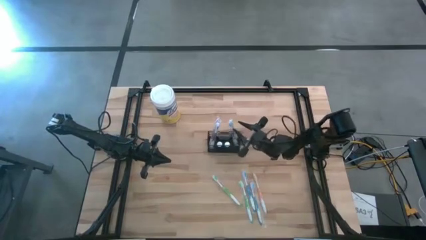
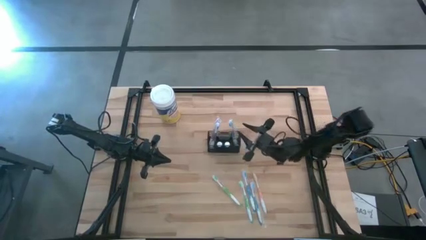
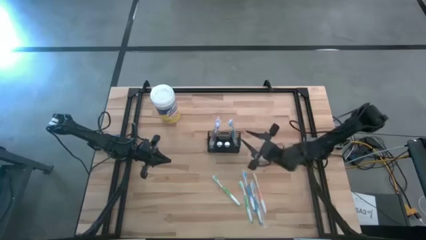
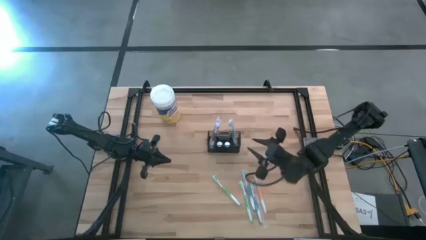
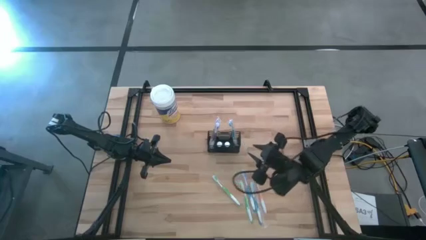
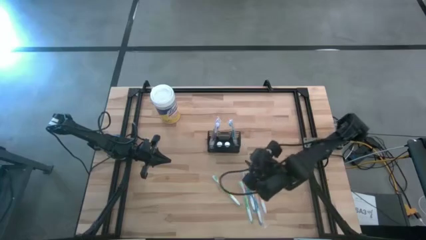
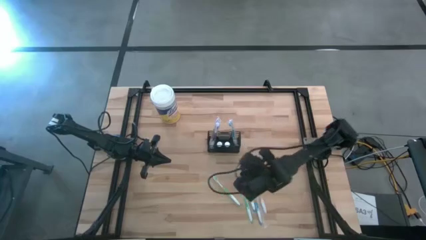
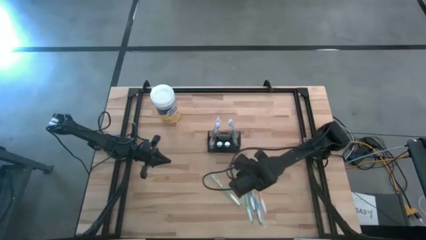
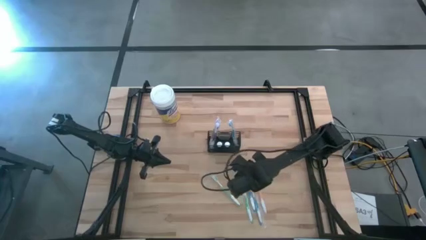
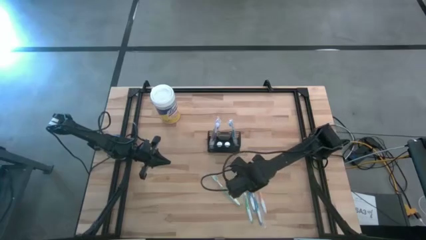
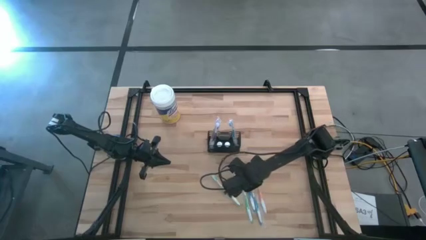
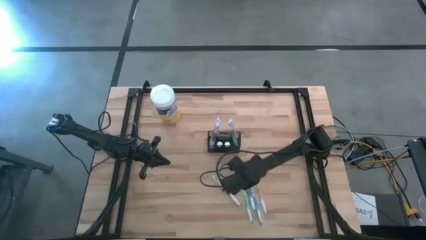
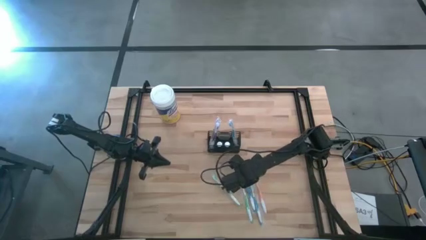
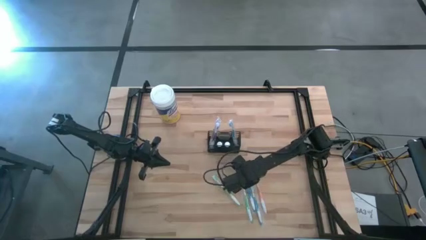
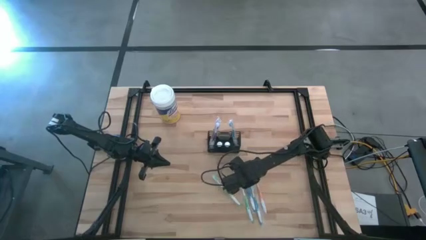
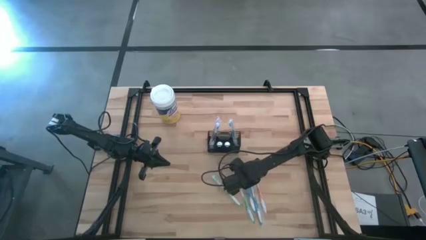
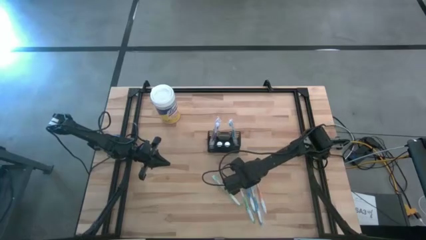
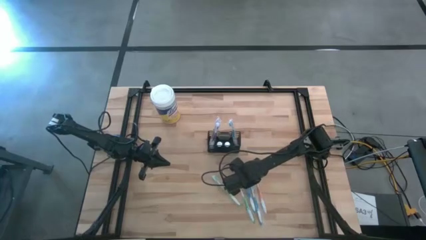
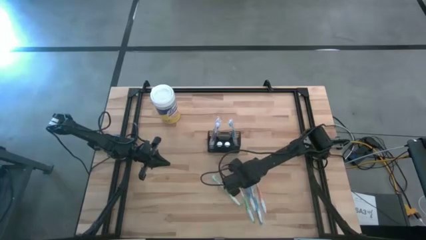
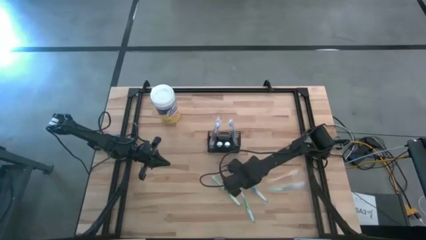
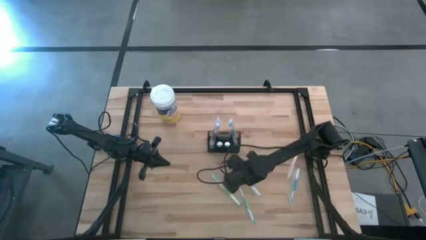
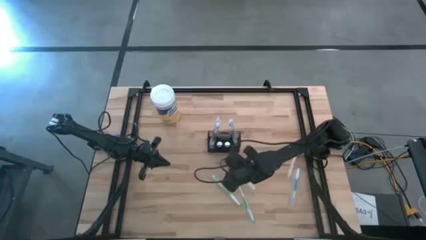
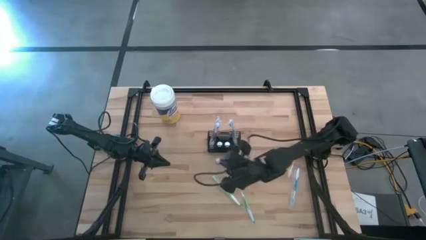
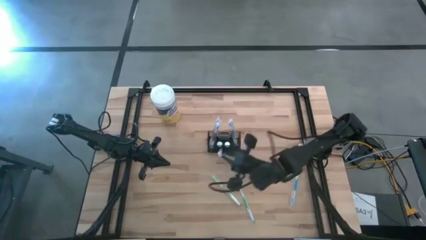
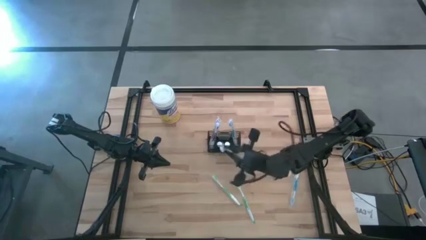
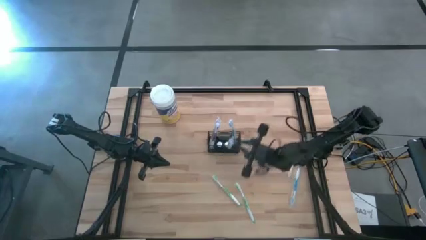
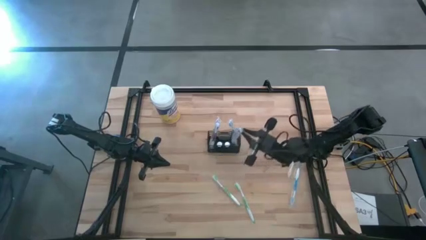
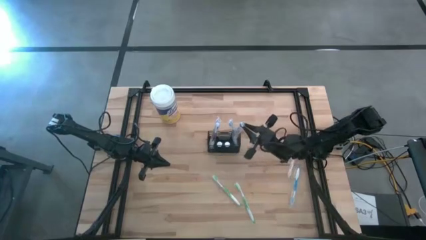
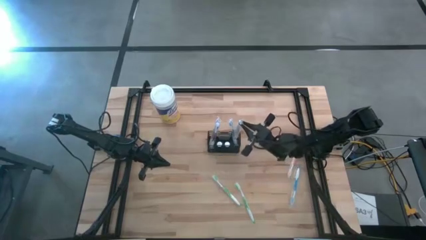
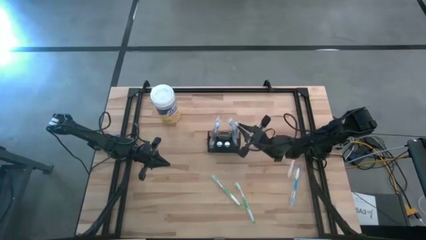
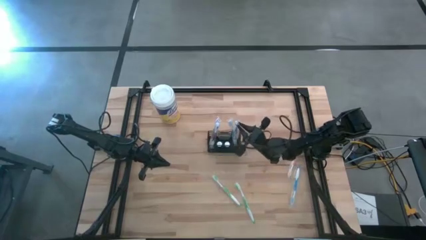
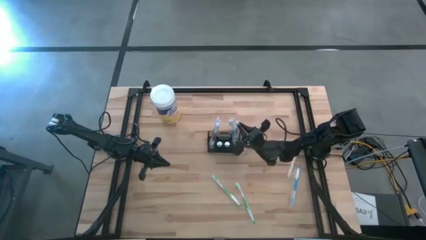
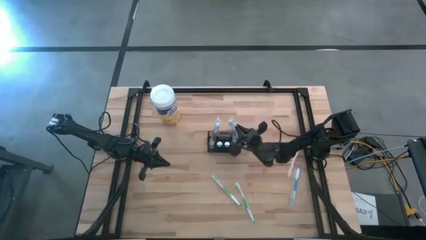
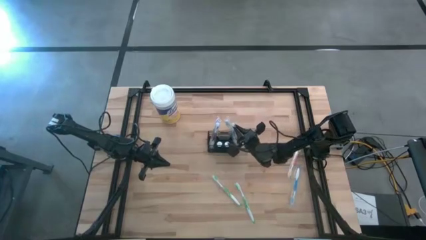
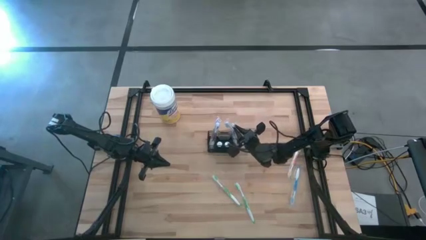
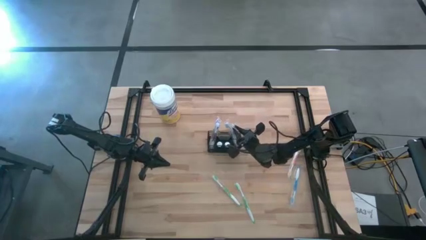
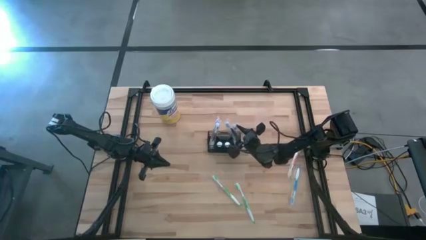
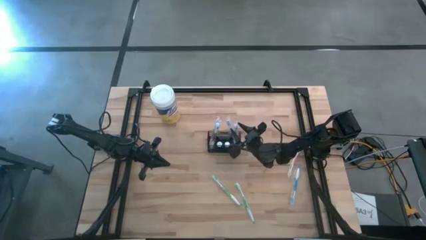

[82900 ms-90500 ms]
Task: Pick & Place toothbrushing station
Put the left blue toothbrush into the wire organizer

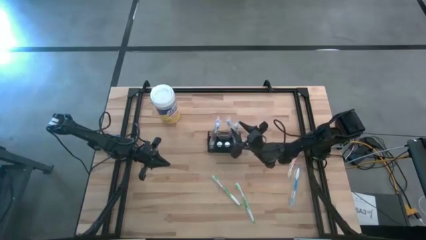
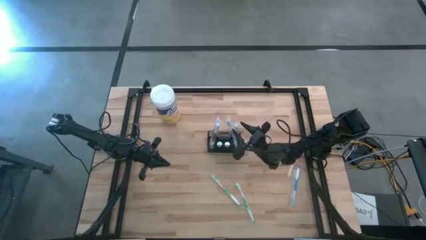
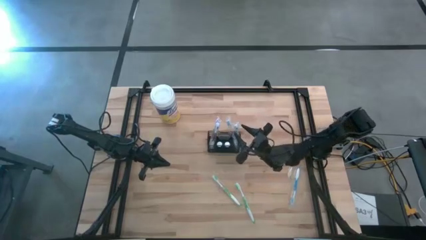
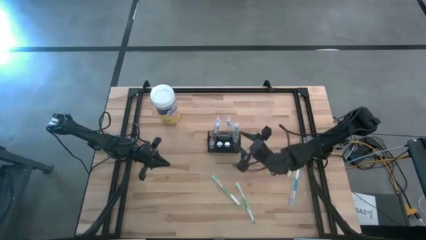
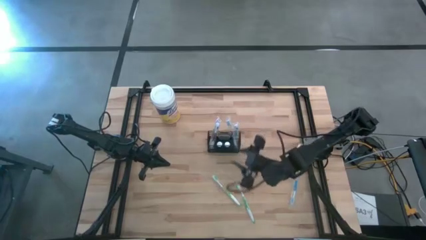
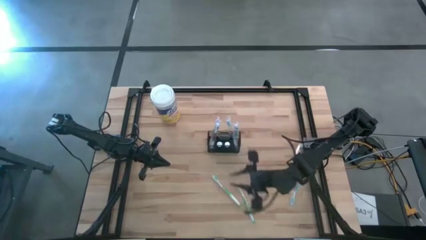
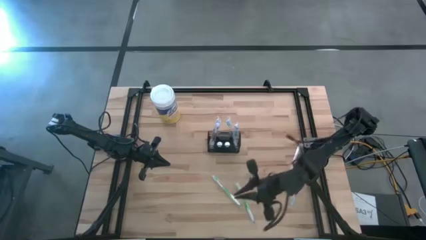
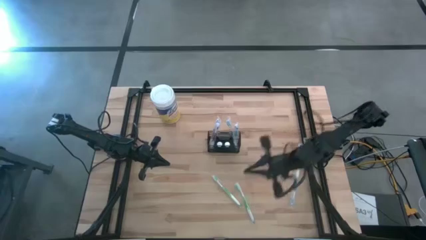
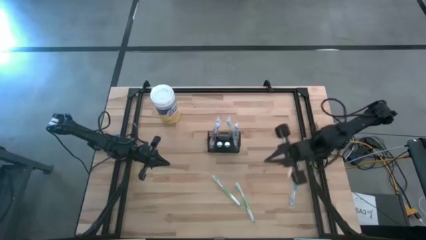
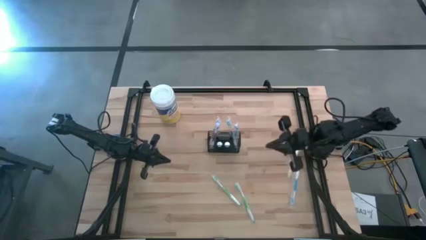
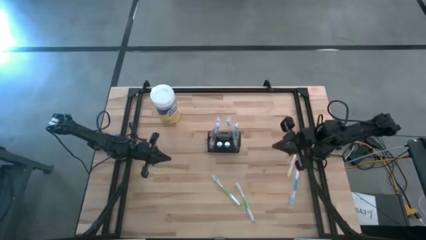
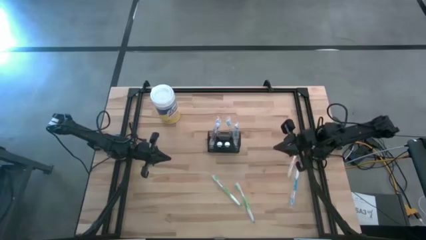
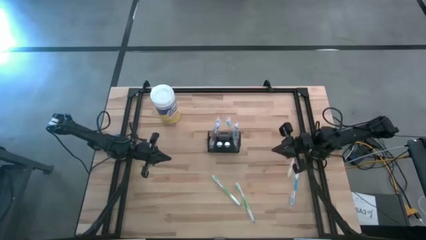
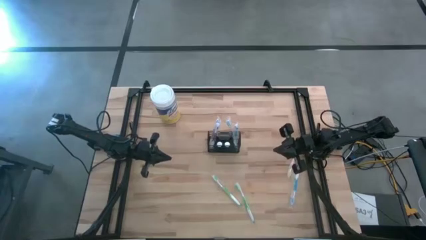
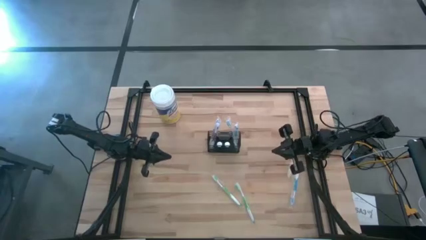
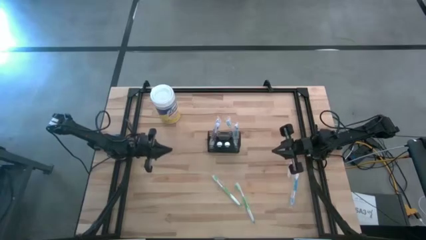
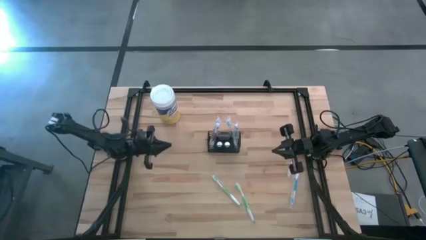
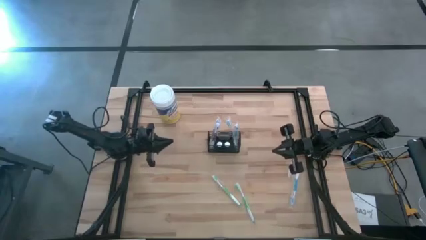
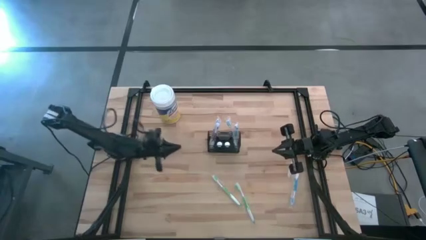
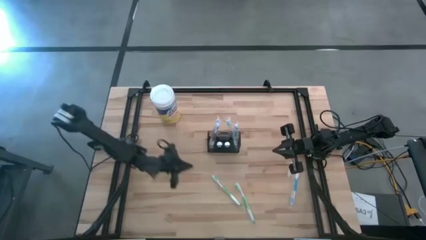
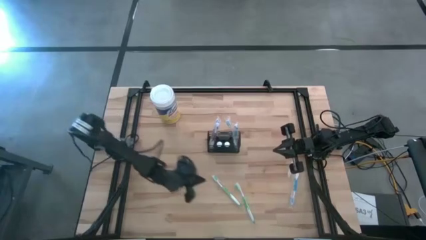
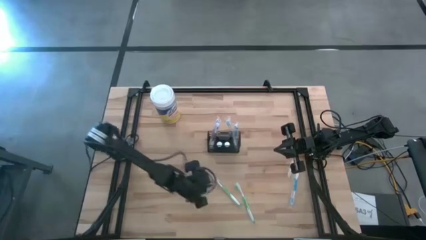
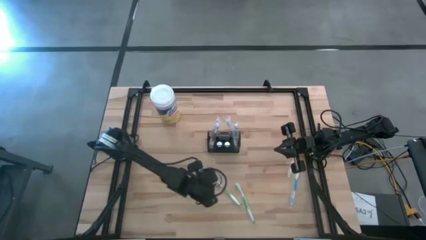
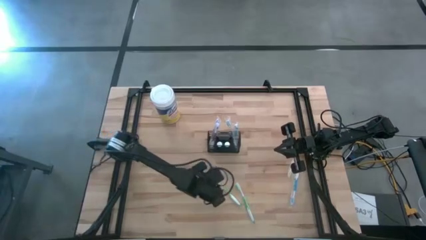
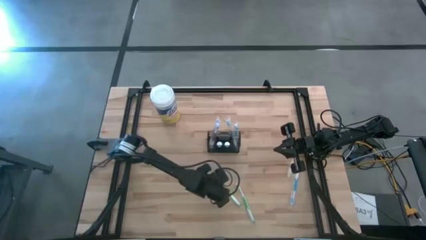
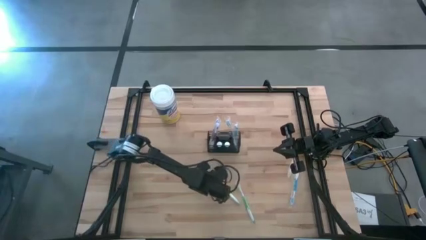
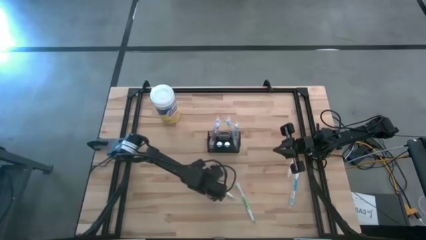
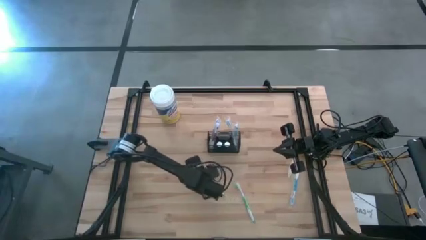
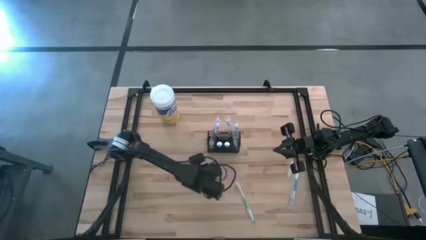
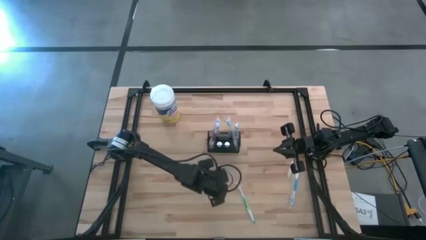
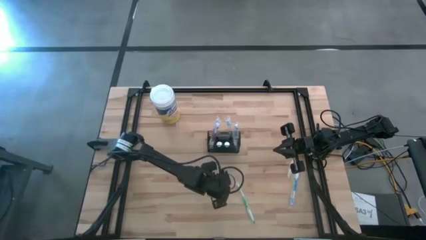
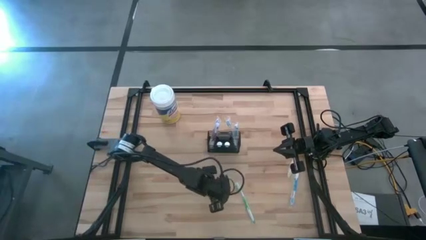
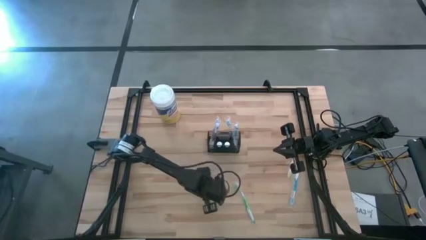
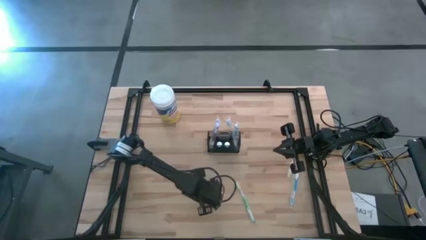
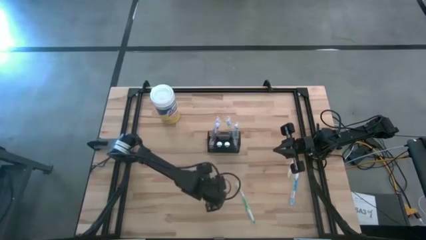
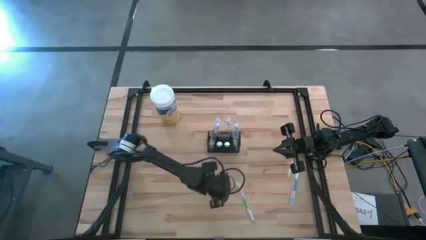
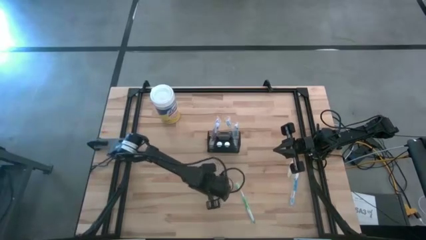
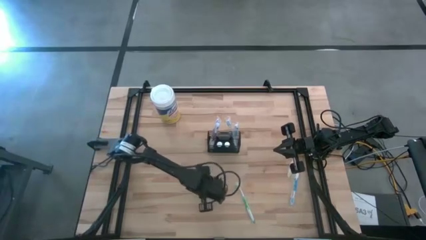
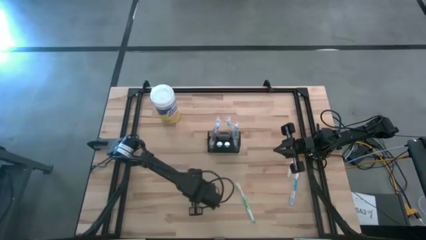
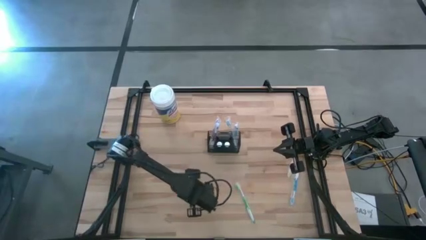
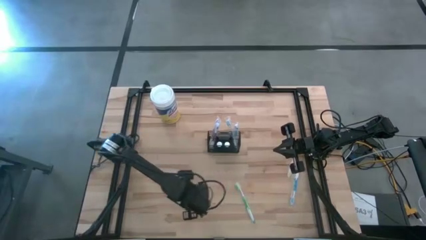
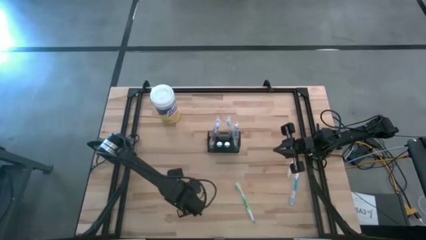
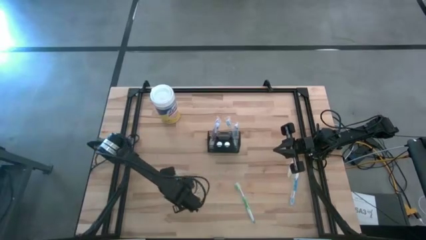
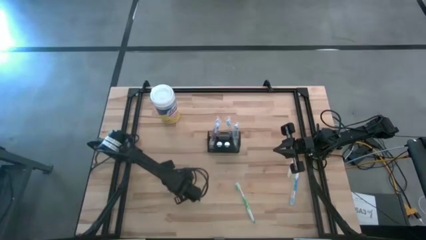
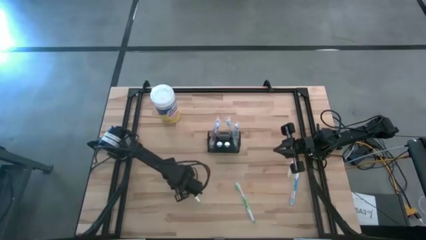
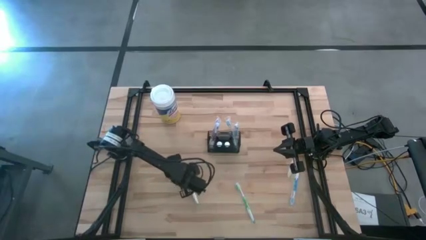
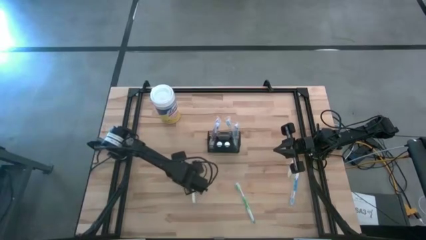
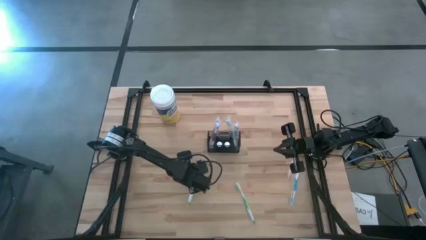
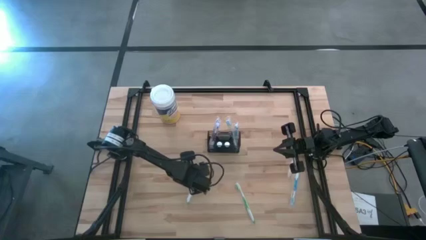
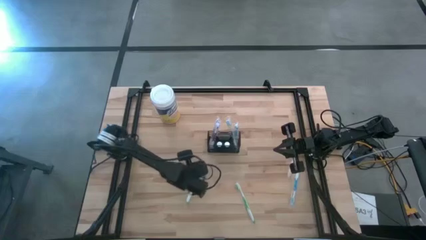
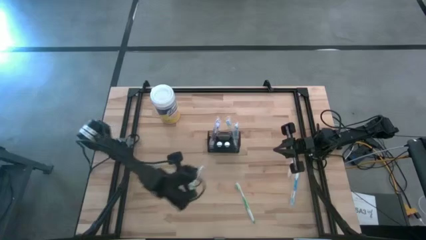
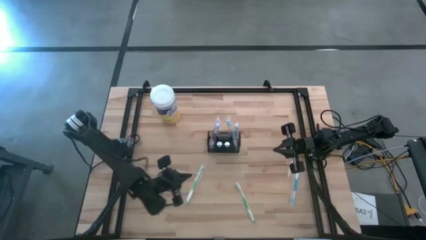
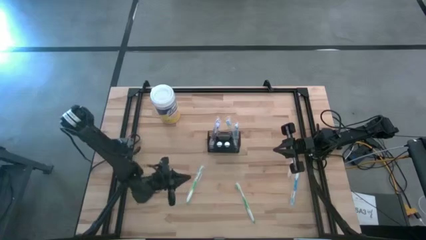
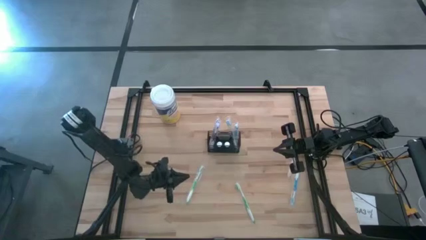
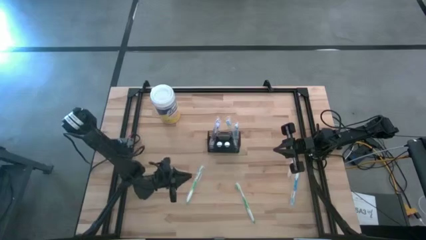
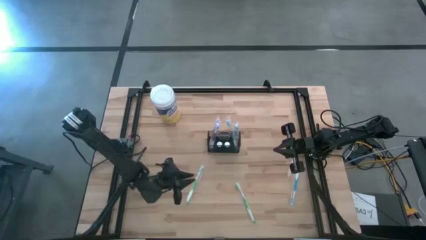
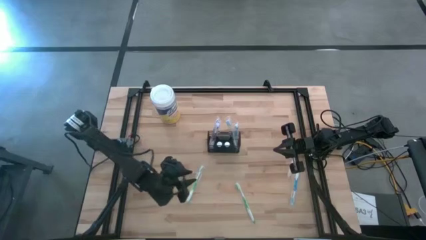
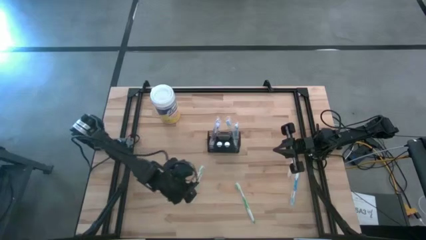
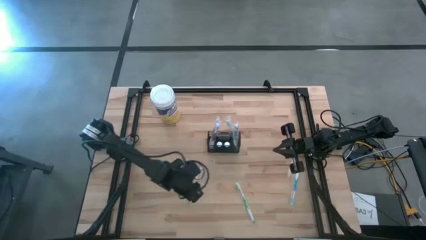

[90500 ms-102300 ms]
Put the left green toothbrush into the wire organizer
